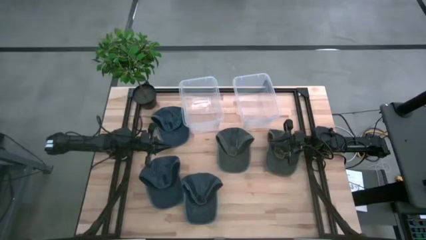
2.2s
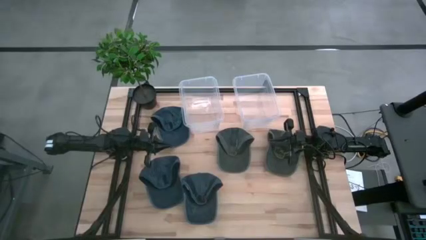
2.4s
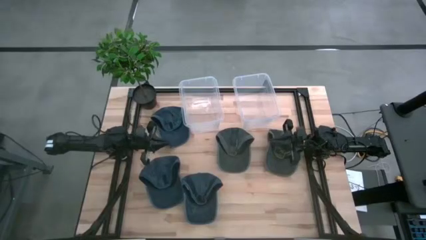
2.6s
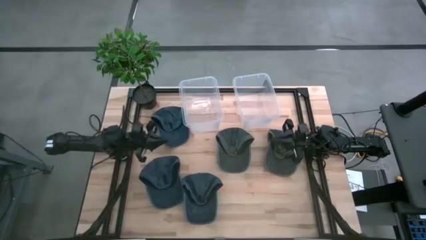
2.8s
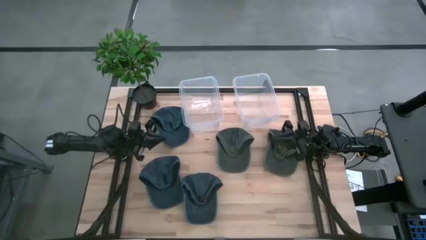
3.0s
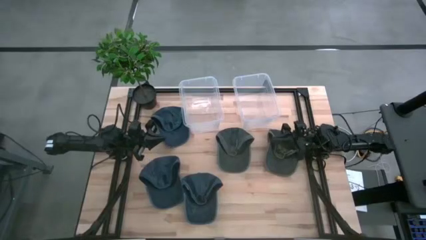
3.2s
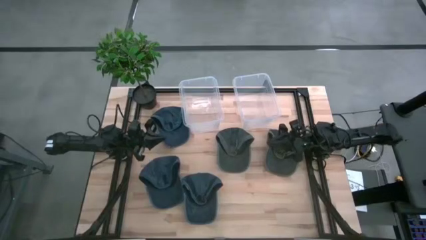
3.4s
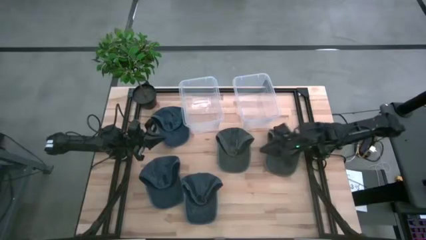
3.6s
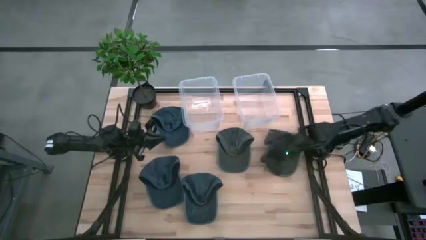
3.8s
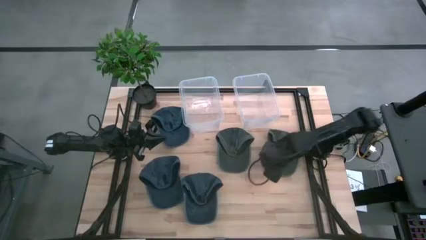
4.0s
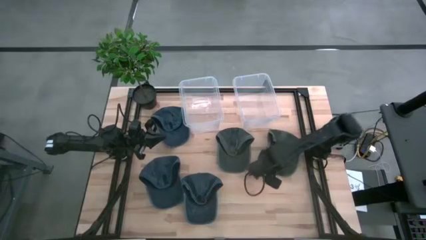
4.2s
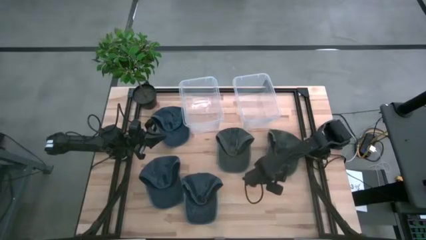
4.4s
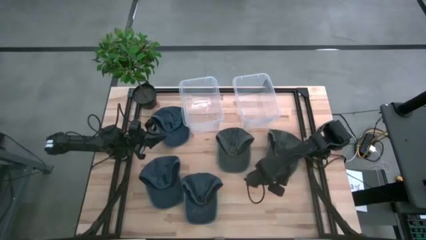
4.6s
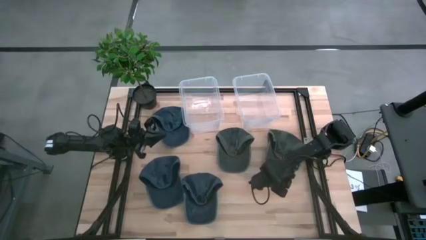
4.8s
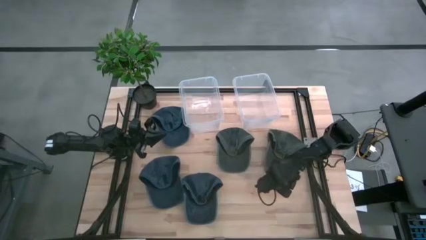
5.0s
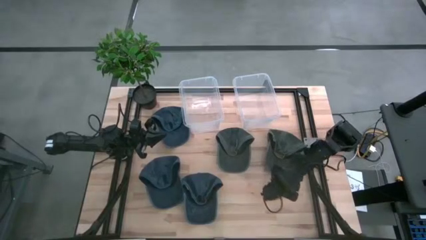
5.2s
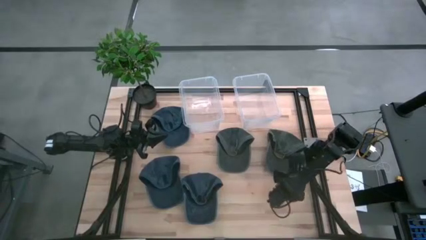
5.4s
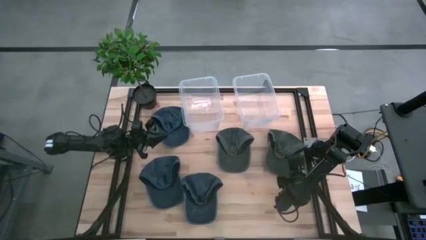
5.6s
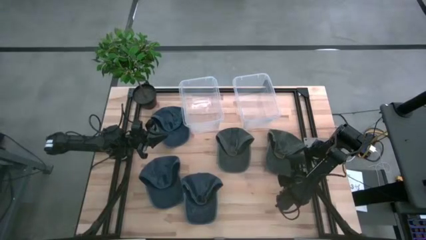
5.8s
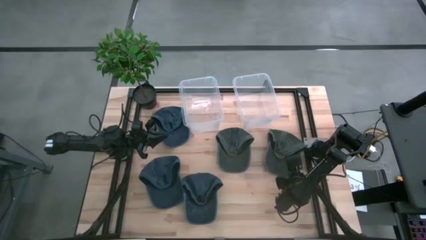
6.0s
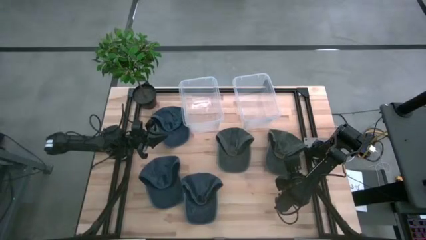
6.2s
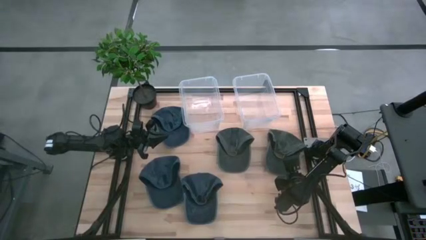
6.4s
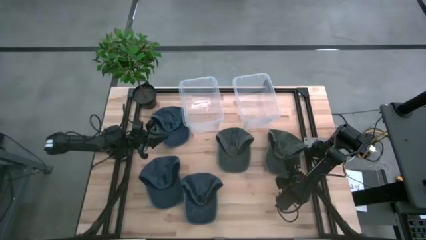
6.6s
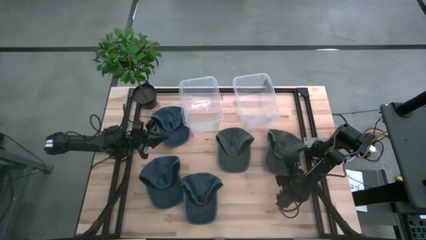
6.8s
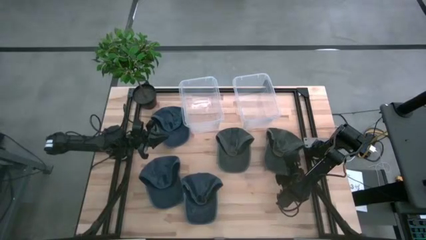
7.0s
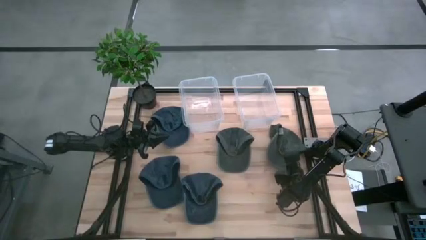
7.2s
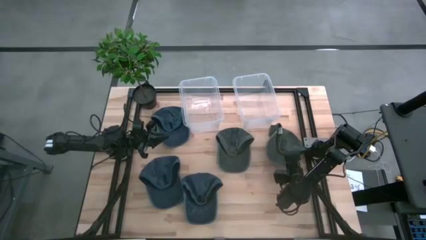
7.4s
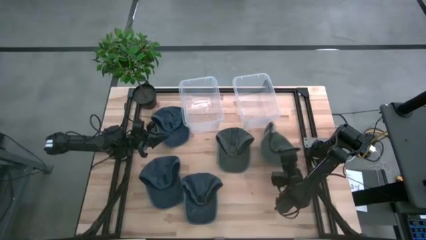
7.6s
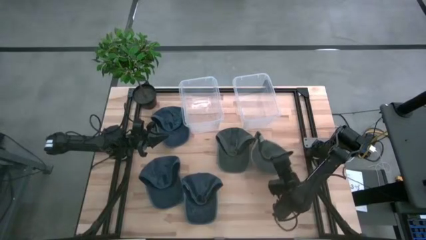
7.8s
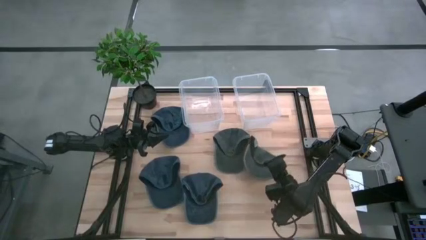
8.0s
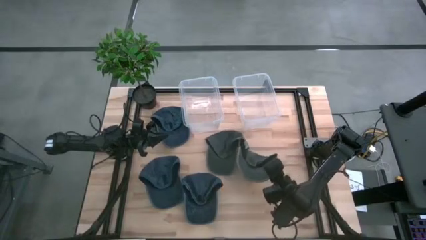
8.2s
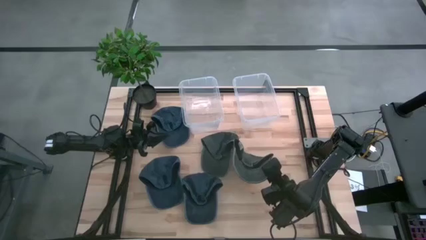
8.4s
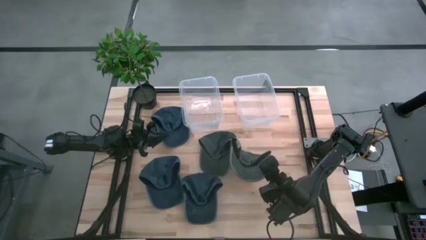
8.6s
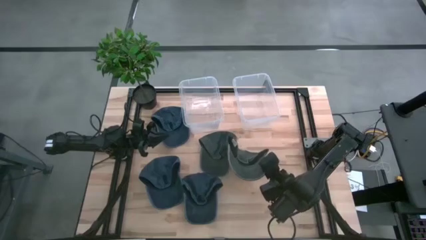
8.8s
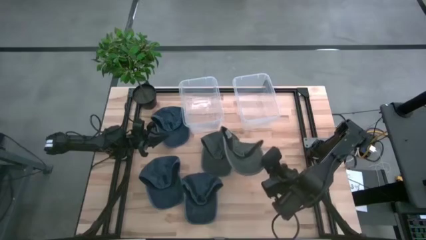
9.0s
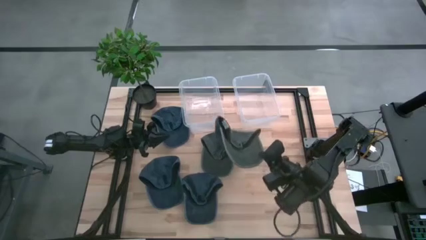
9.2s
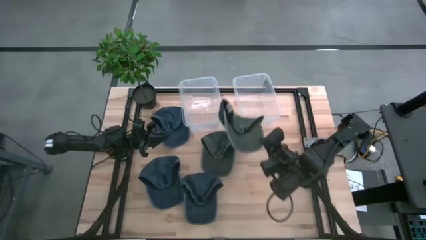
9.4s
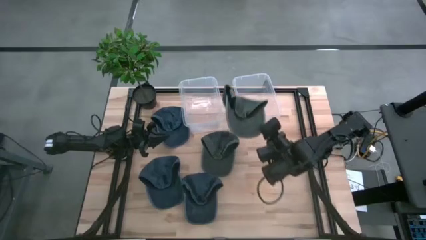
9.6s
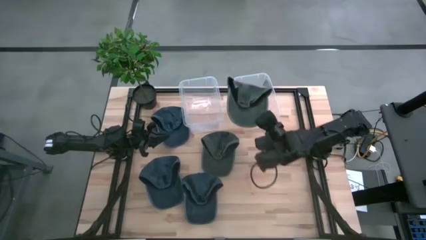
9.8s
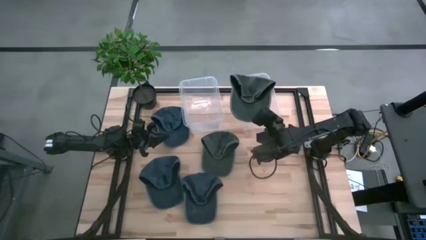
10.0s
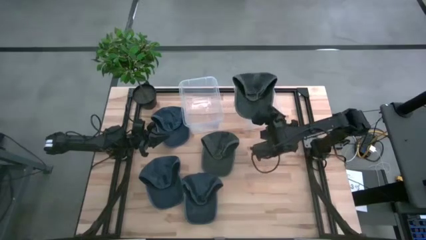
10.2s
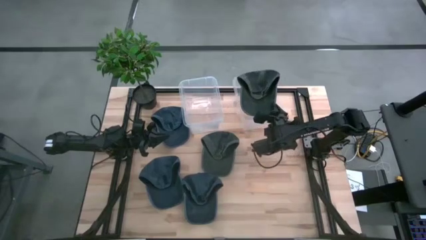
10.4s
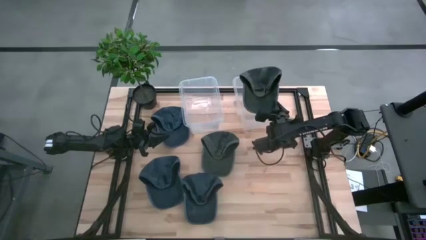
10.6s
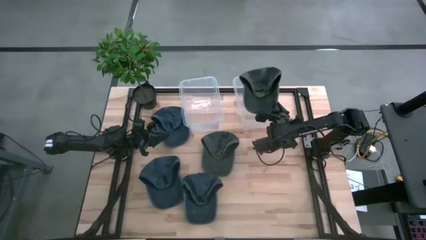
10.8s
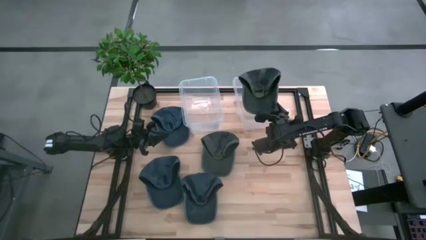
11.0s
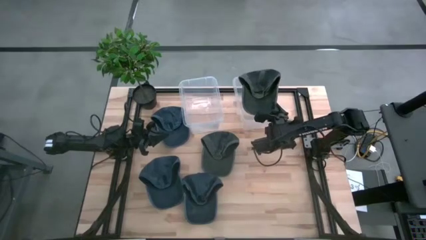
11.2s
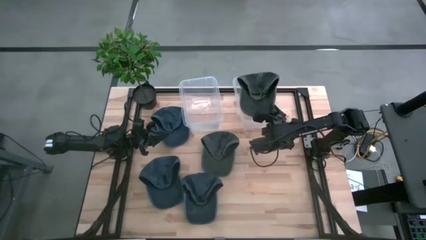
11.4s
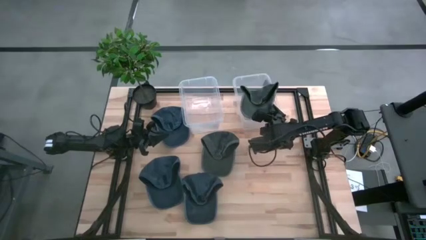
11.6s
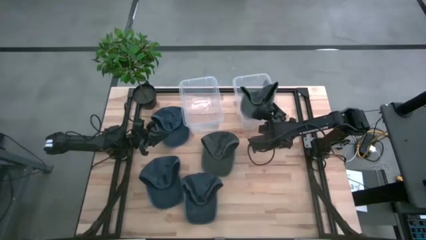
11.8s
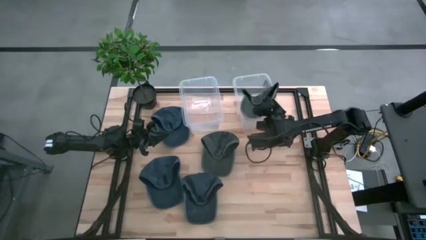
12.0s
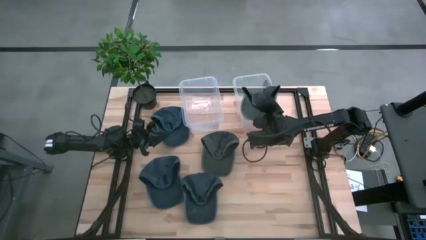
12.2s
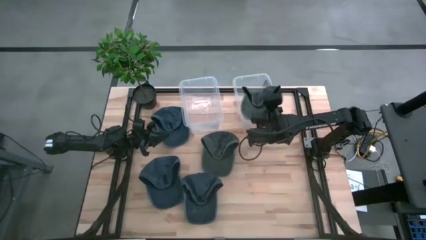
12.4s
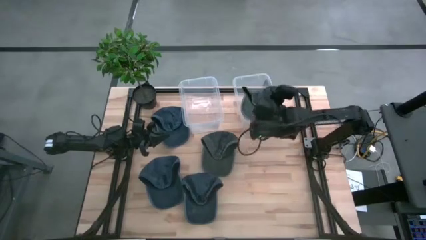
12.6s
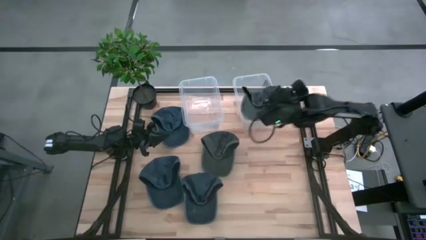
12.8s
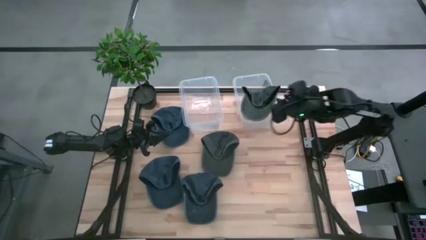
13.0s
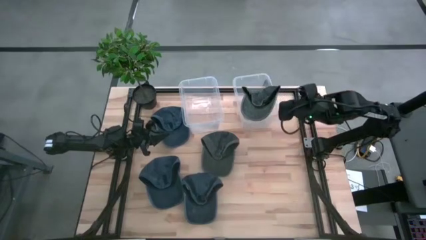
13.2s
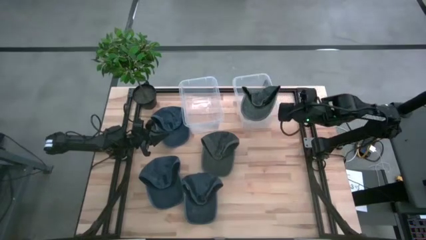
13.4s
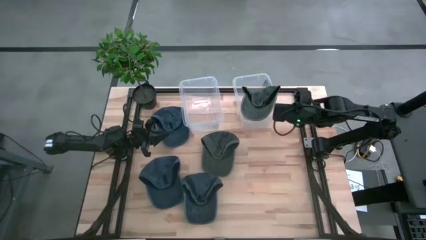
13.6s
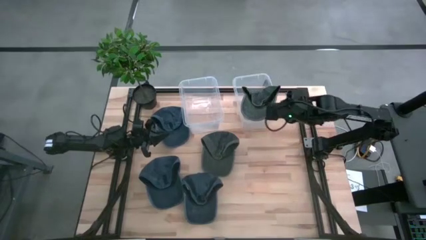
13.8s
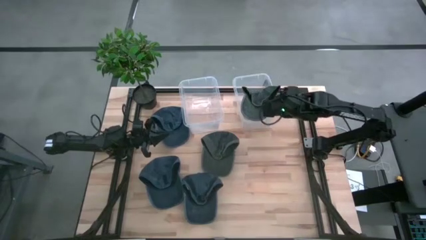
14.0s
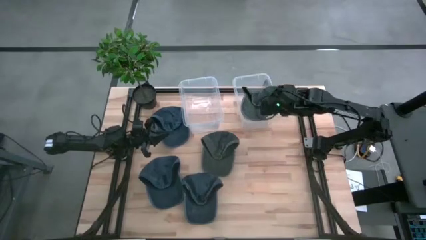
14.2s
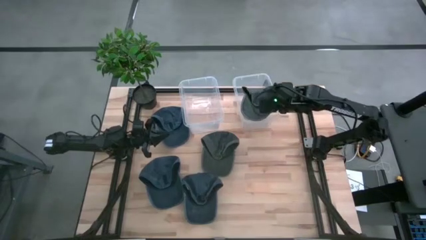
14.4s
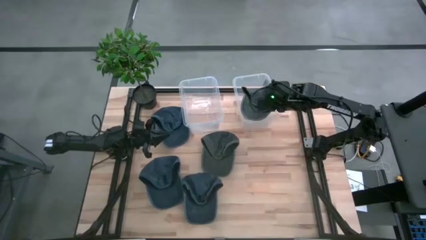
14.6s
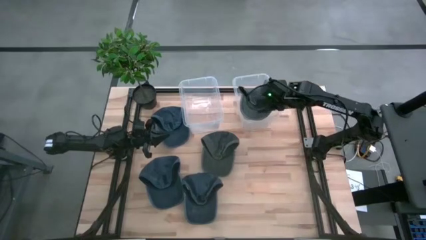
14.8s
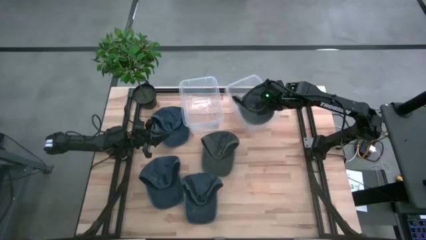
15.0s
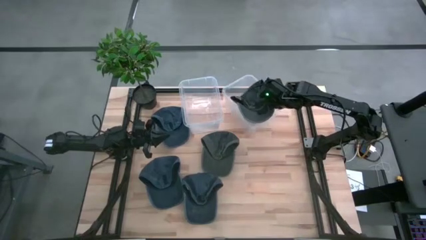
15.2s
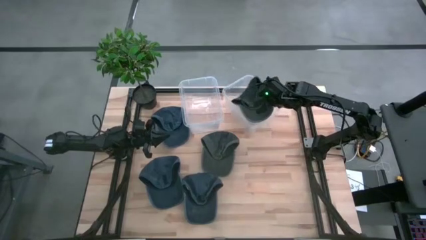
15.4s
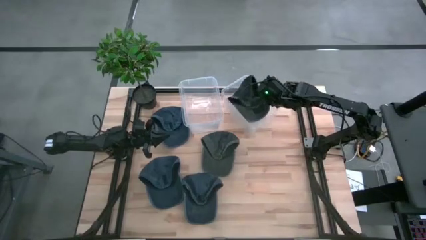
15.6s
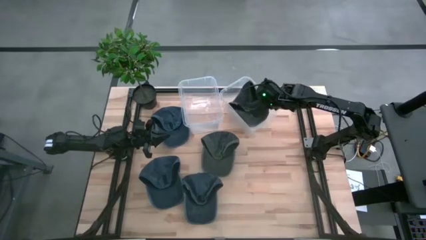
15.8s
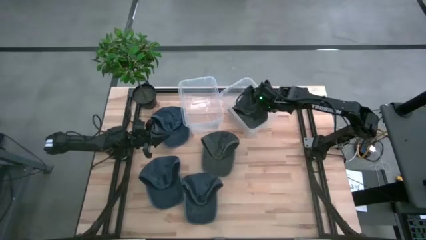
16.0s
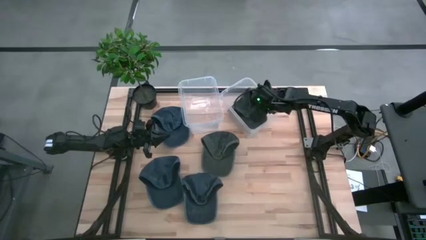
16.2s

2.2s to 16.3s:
Task: Pick & Place hat
Put the right green cap into the right transparent bin

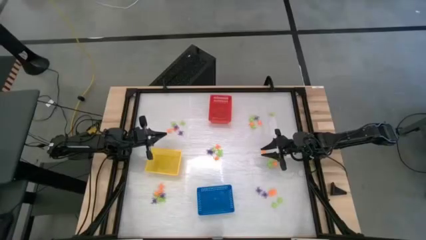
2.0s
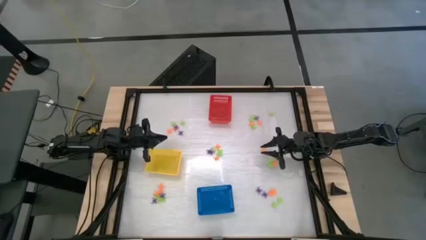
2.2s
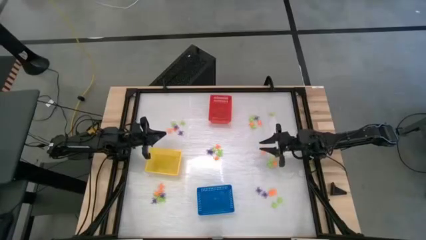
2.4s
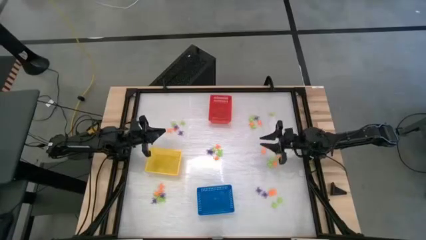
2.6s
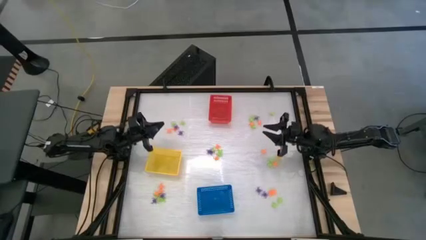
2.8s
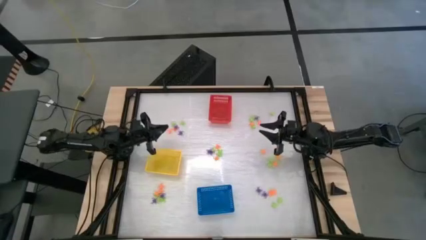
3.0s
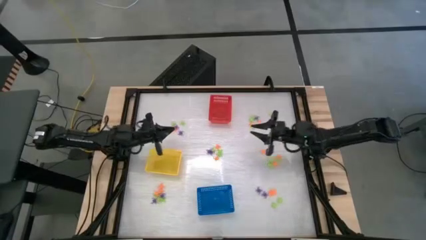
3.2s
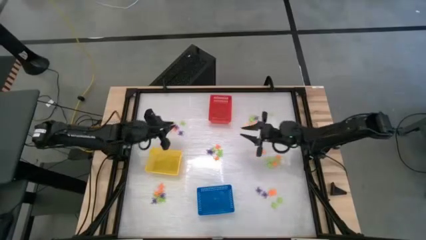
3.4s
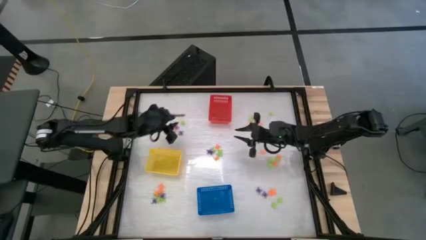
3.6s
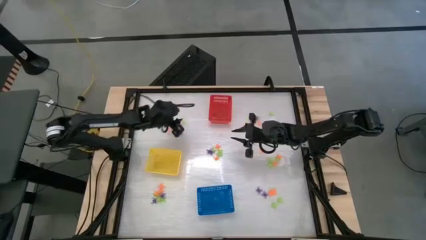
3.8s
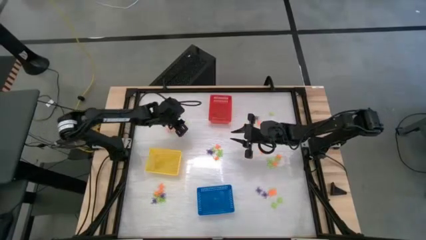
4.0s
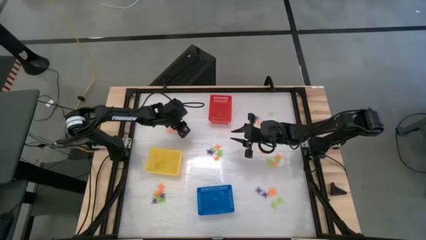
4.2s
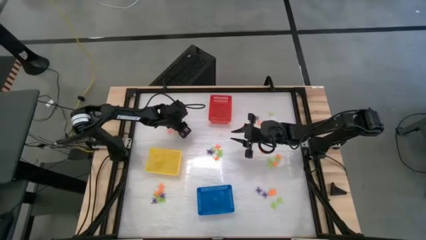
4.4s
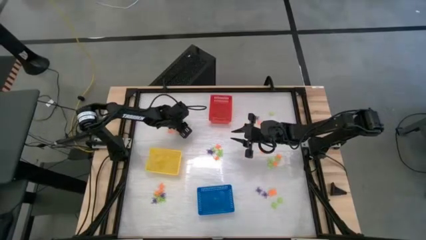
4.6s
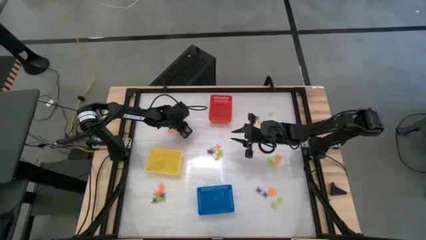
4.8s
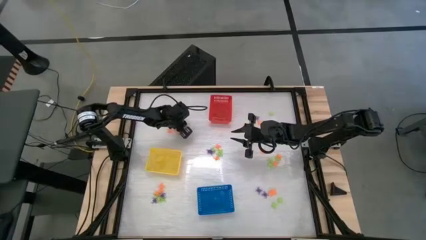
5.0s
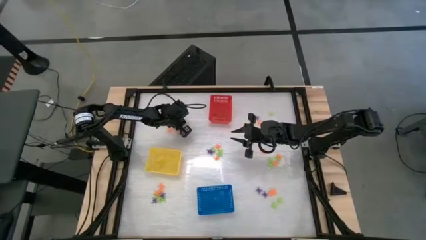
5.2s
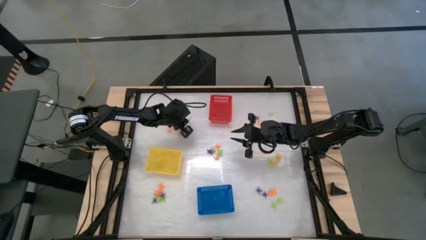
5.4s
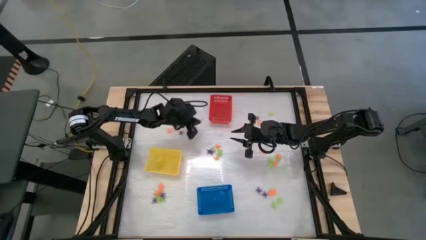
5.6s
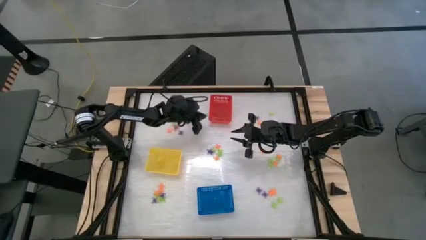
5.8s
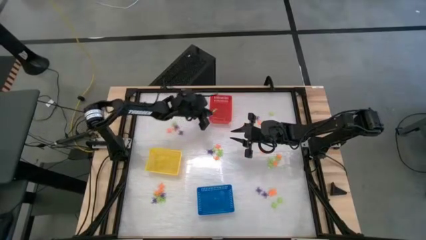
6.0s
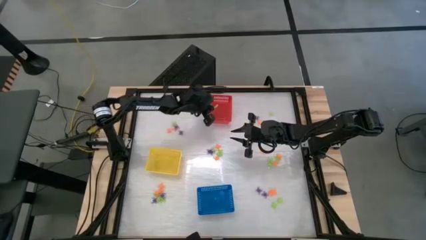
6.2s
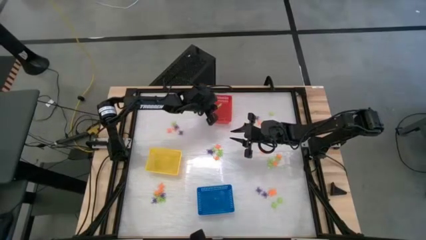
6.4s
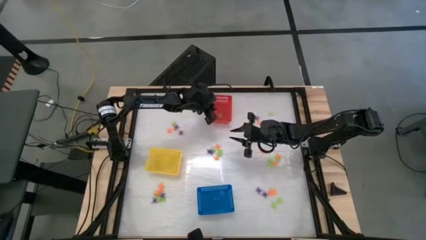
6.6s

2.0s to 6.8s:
Task: Sort Halloween decoration
Put the green spider toy into the red basket
